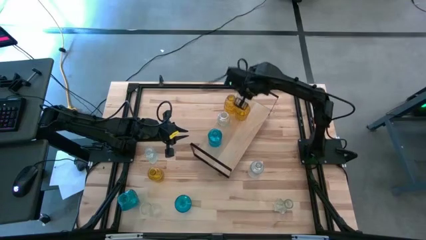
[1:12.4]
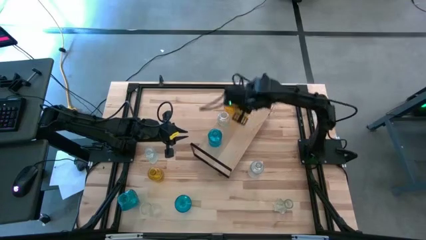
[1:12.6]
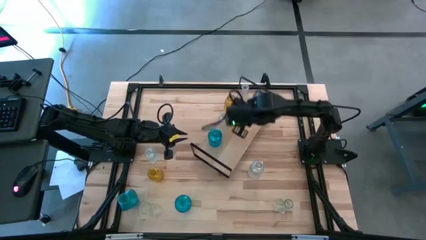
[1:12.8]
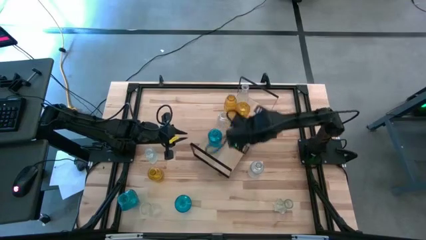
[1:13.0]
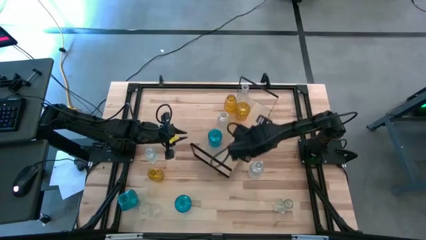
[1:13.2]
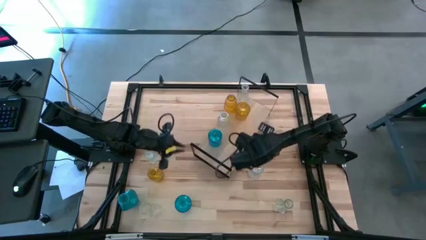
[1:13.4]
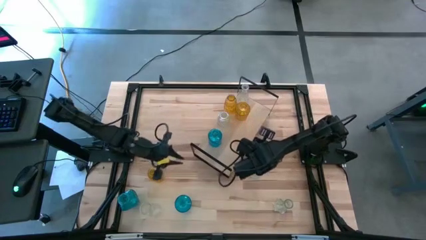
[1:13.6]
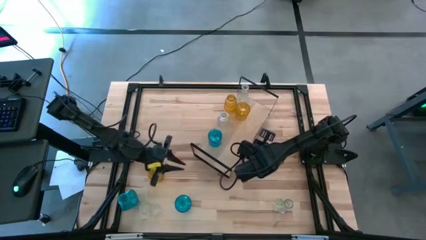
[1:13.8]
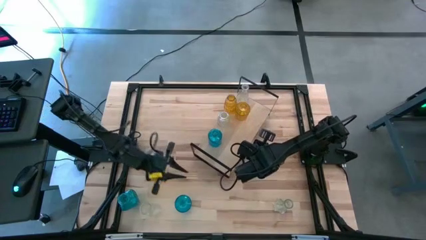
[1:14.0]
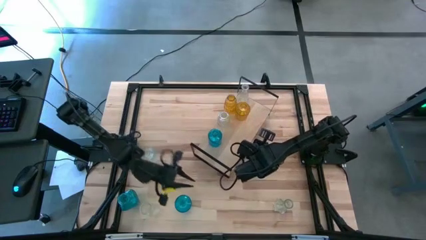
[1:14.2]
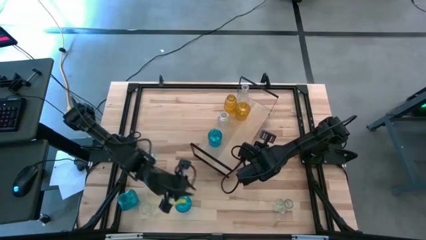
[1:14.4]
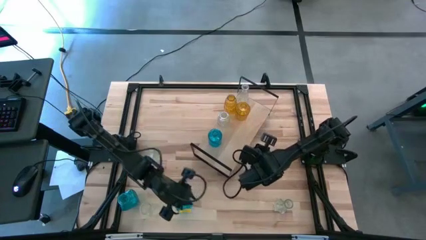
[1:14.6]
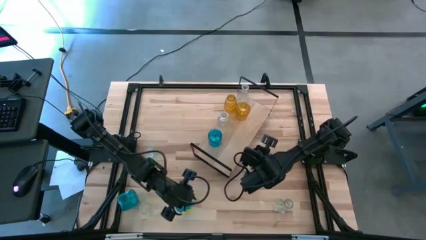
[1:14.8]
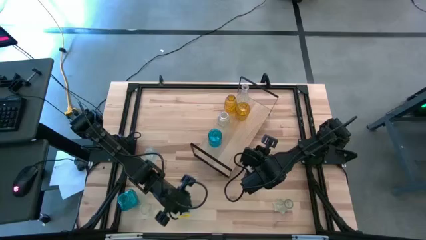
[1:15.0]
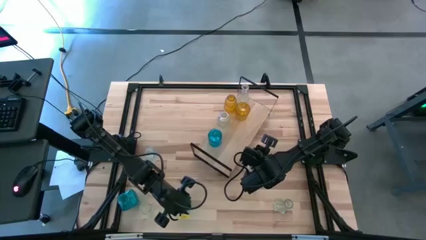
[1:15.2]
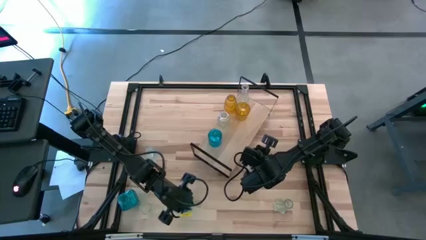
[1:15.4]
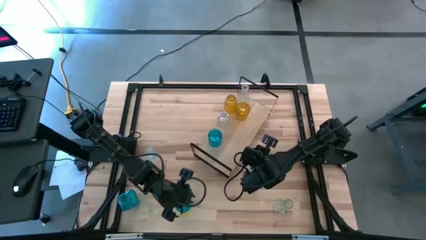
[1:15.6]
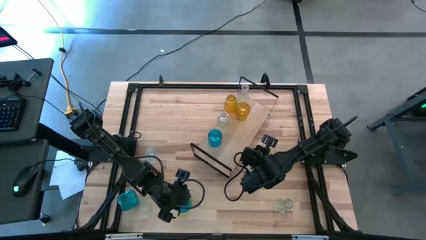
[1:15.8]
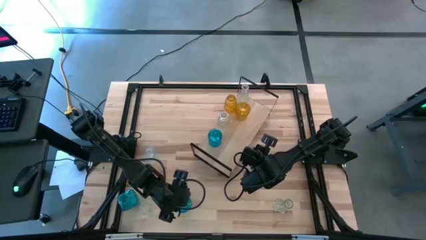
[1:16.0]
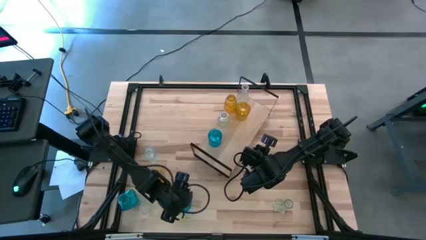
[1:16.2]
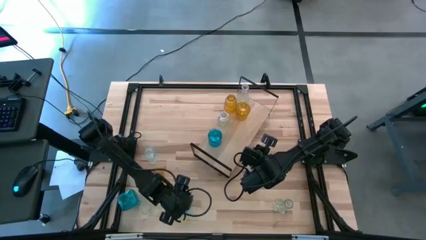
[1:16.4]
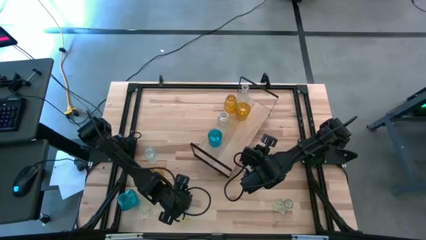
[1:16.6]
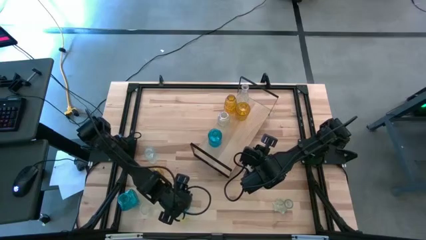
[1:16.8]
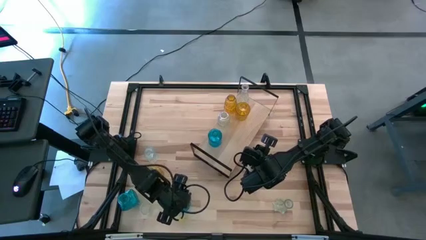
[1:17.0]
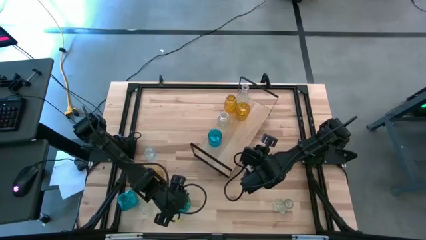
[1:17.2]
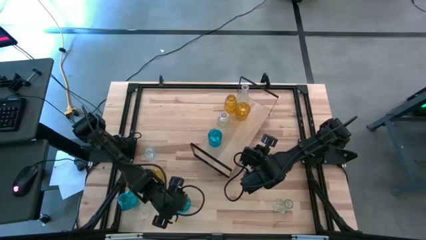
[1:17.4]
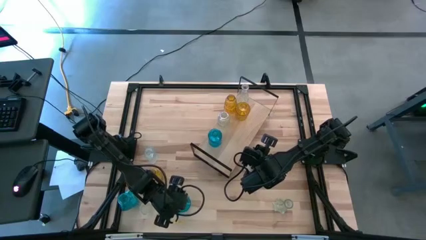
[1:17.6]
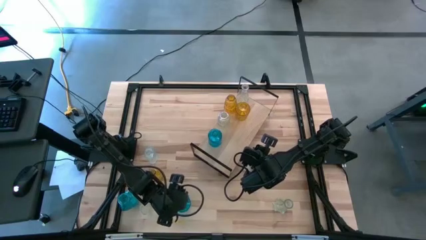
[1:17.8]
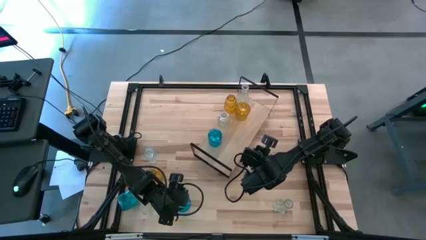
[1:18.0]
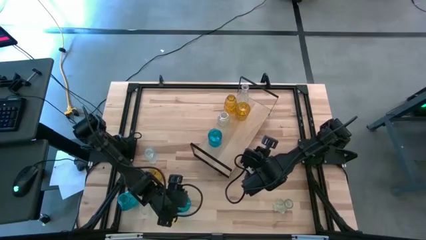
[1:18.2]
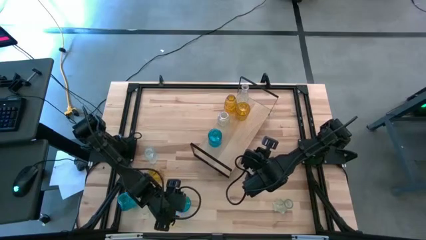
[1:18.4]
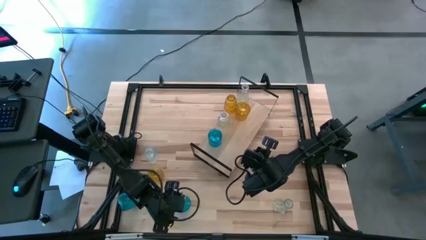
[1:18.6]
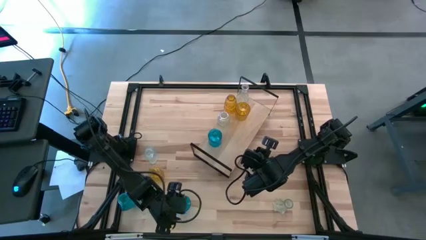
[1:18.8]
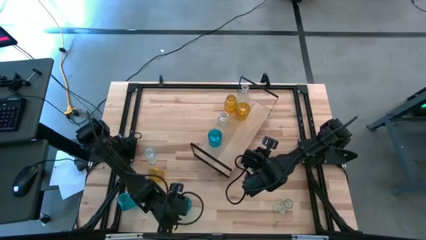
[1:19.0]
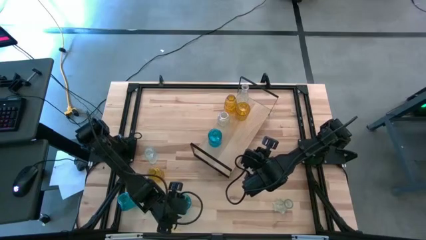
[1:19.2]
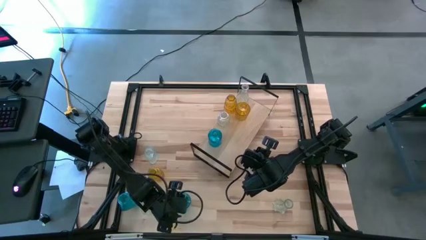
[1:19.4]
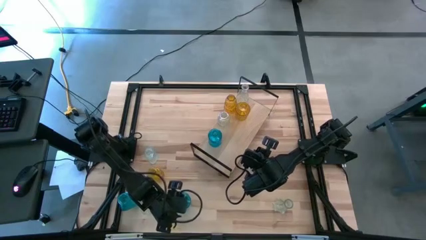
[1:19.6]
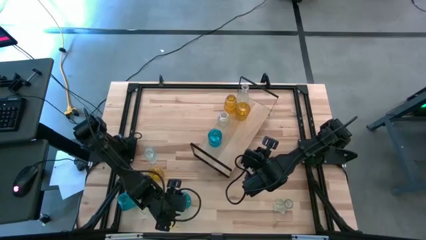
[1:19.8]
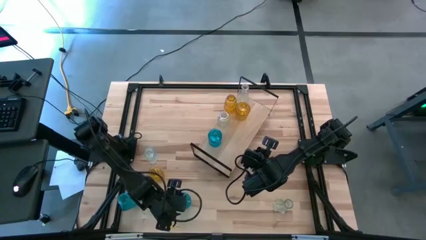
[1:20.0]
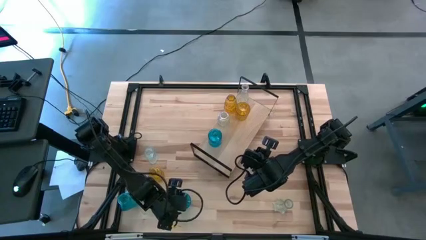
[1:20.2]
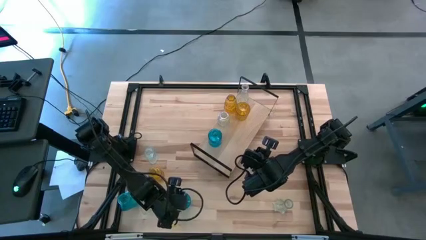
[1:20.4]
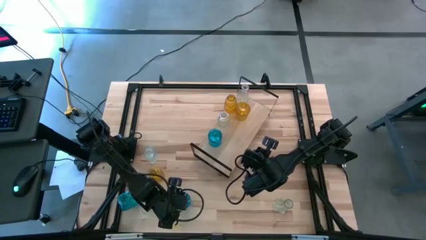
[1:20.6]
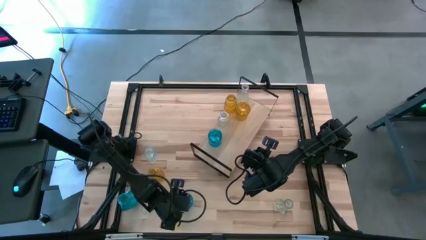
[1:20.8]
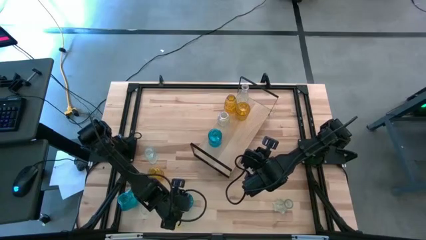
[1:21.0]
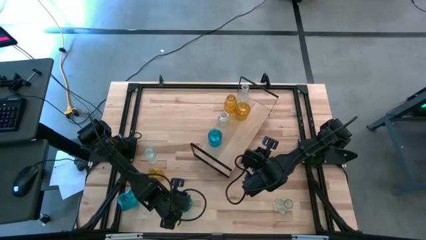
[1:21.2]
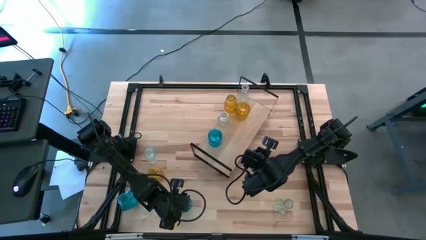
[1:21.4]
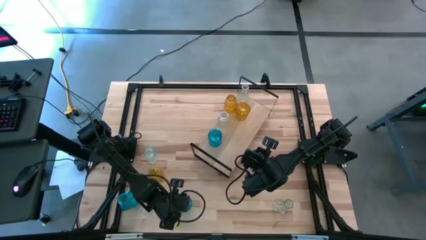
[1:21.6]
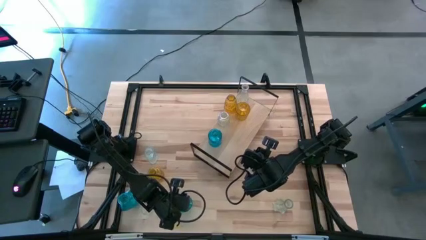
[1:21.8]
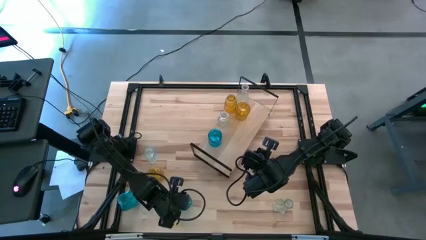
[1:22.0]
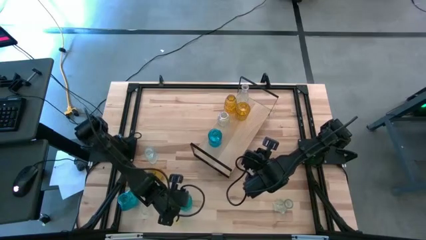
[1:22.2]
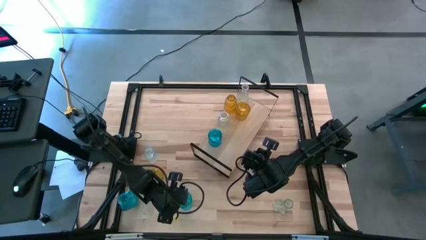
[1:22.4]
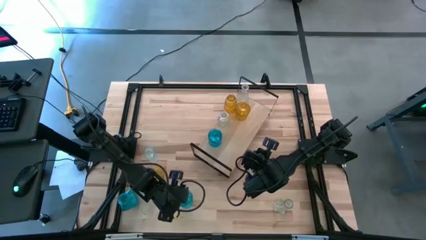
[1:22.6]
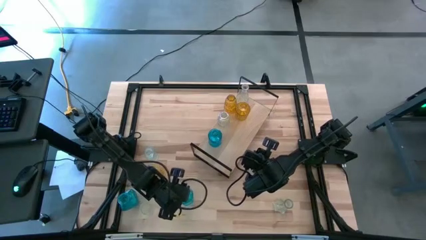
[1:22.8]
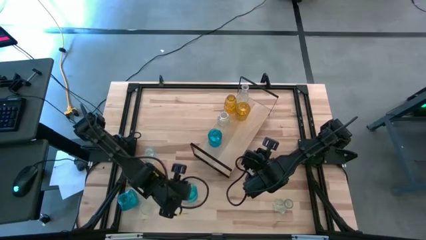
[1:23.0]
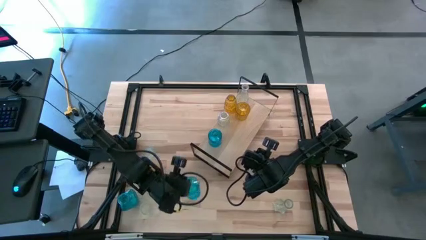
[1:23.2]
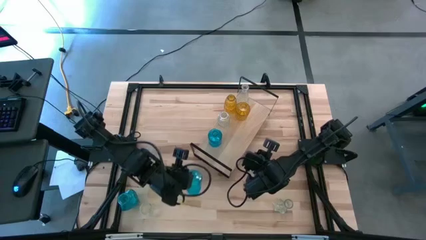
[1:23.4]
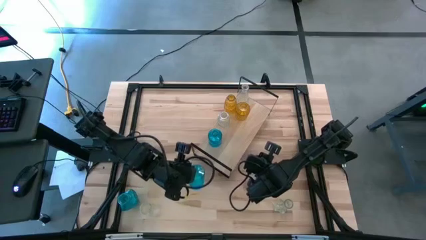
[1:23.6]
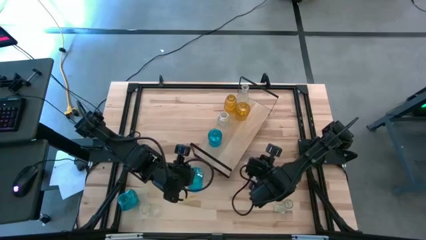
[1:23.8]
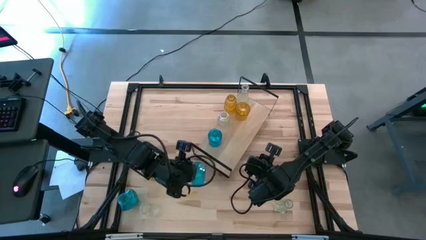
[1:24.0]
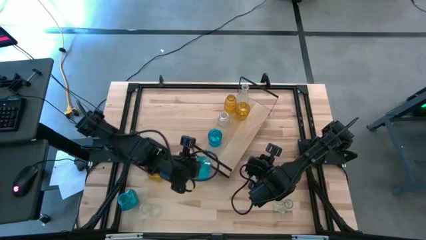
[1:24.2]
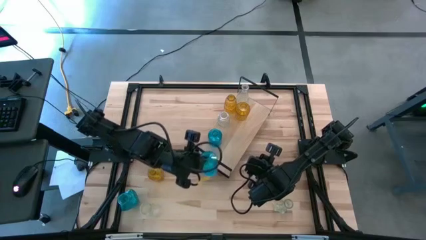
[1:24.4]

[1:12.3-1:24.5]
Task: sort vases onto shelf
Put the right blue vase on the shelf and align with the other blue vase
